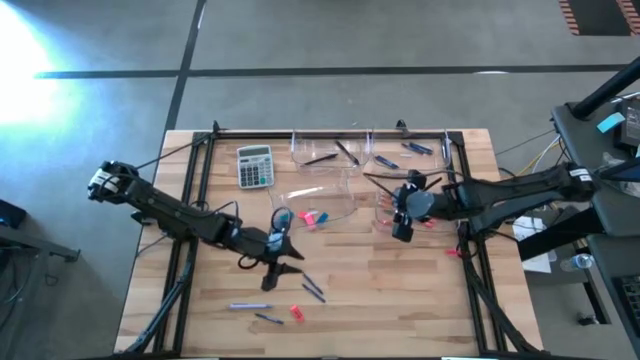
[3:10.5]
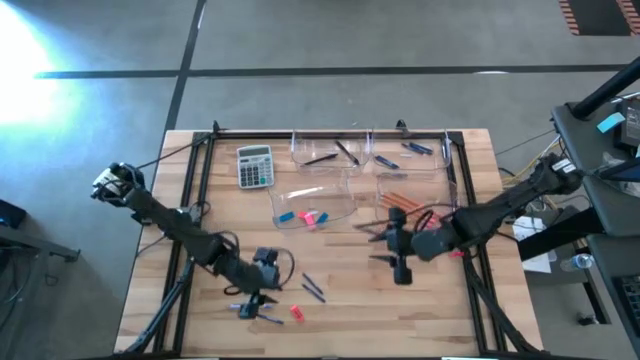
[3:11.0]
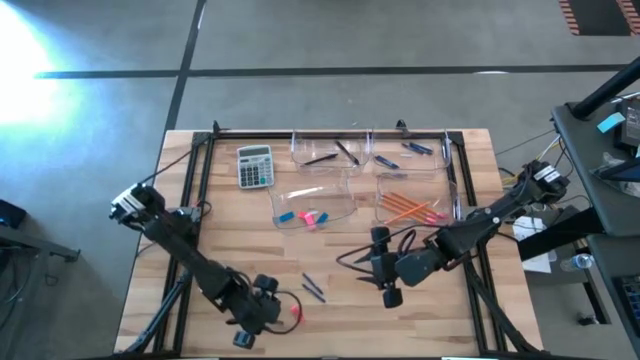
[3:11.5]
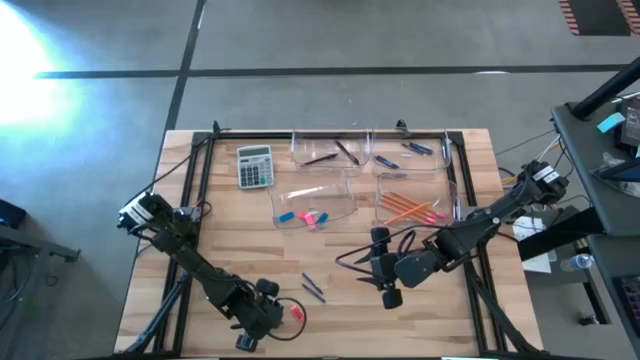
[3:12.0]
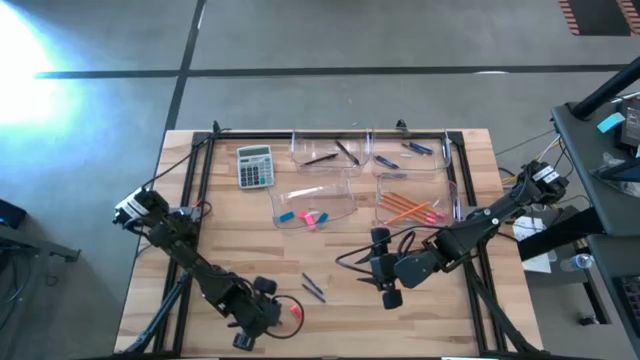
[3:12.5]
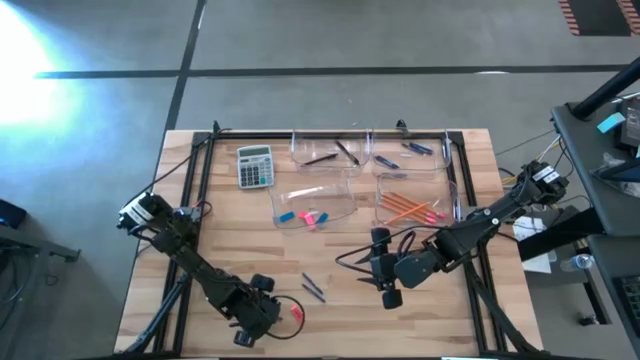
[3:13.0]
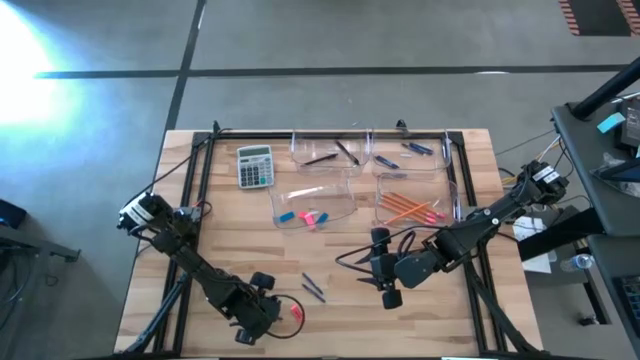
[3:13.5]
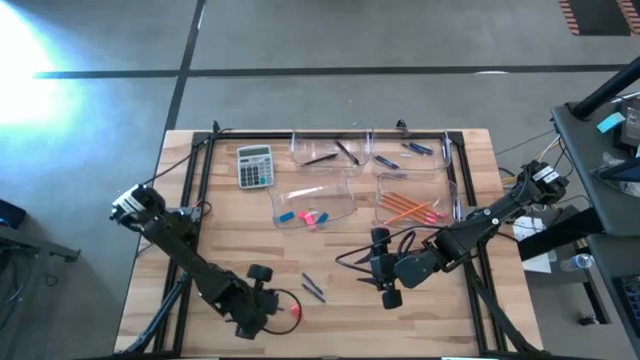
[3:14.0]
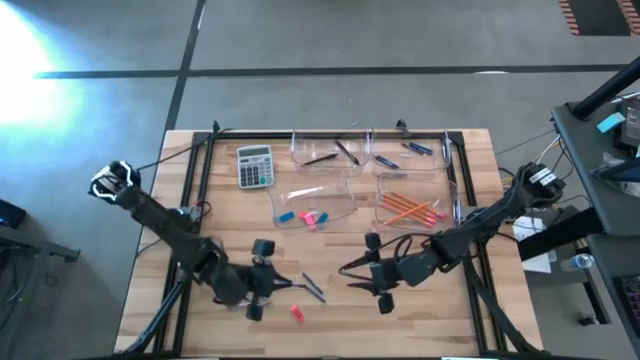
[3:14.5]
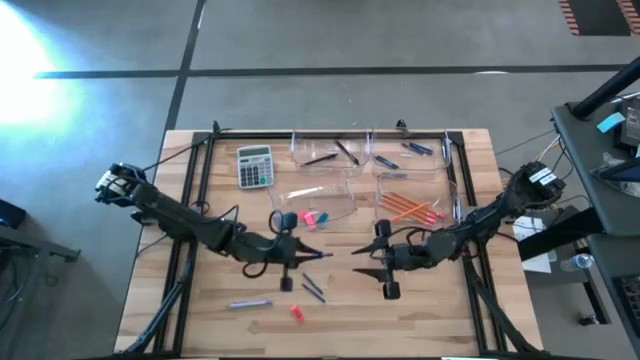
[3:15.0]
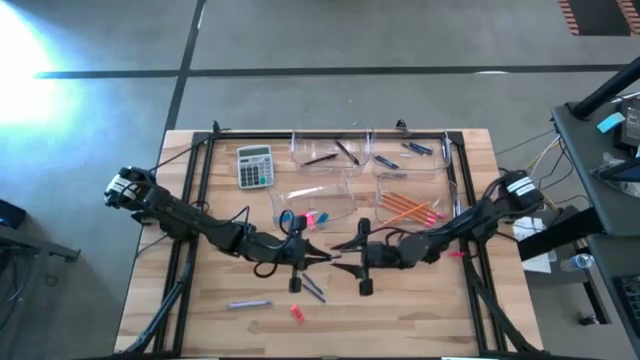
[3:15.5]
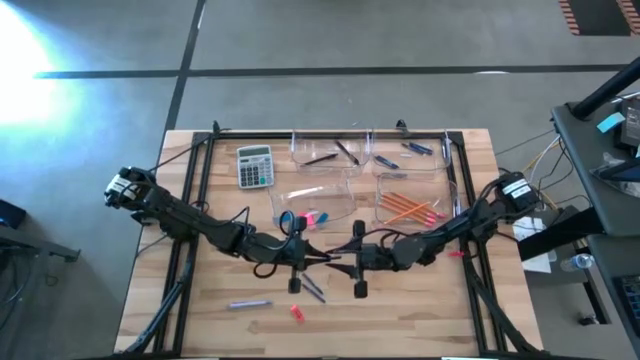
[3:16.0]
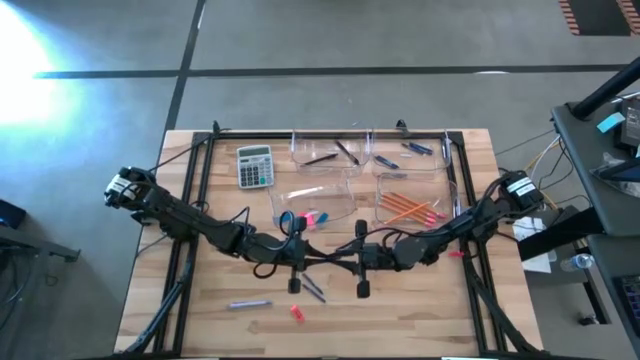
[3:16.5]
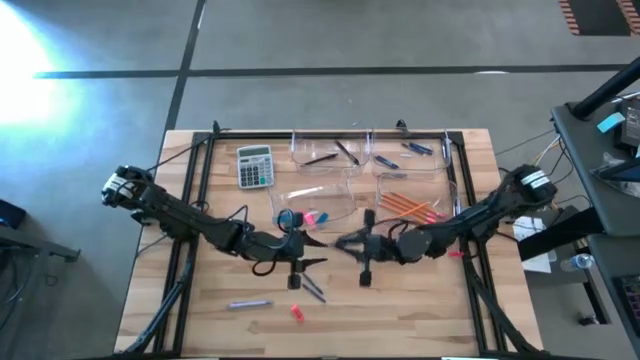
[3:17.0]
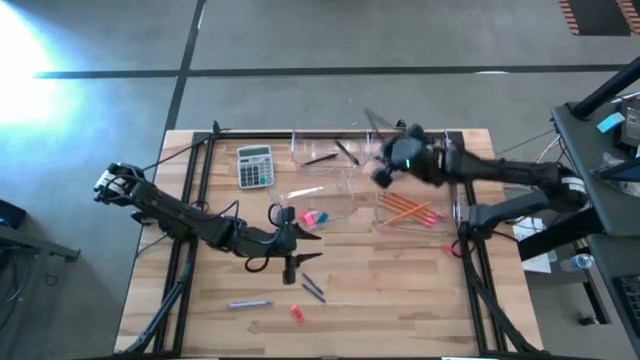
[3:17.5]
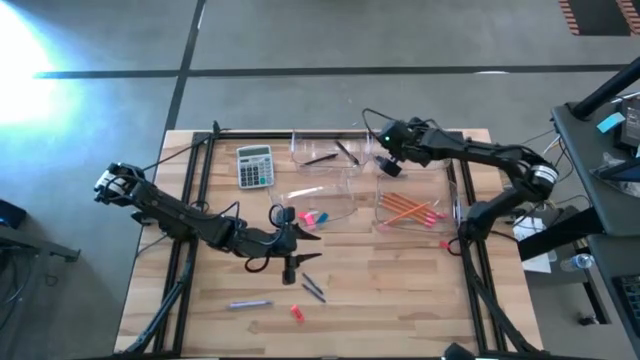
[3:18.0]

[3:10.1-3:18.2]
Task: Sort crayons/erasers/pens/pencils in bins
Put the blue crayon into the top right transparent bin

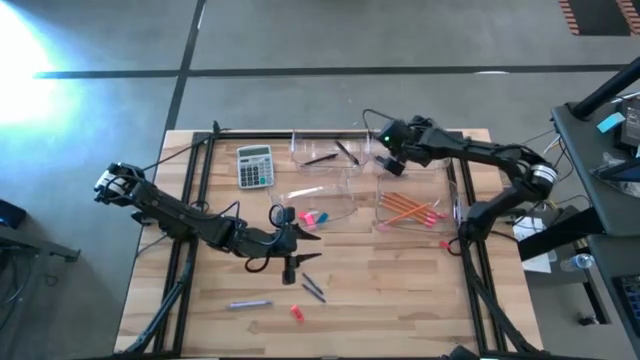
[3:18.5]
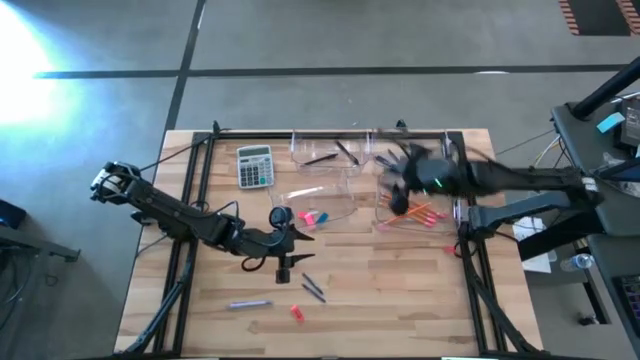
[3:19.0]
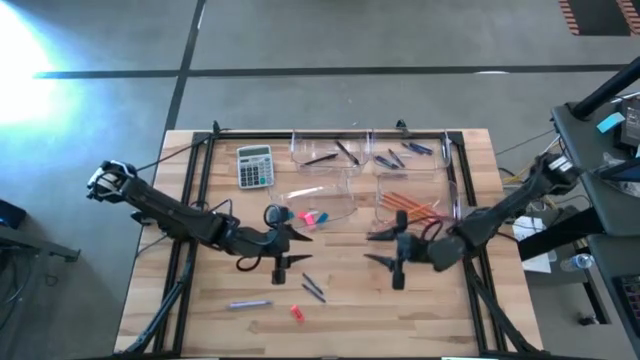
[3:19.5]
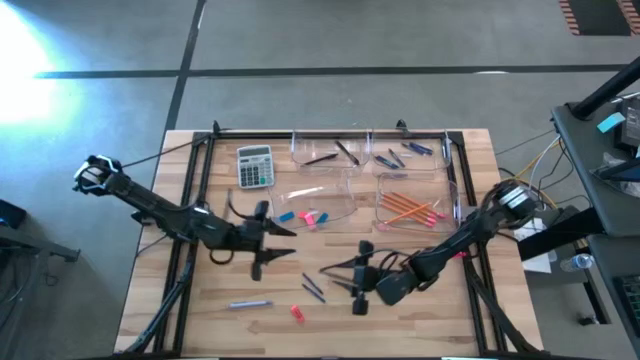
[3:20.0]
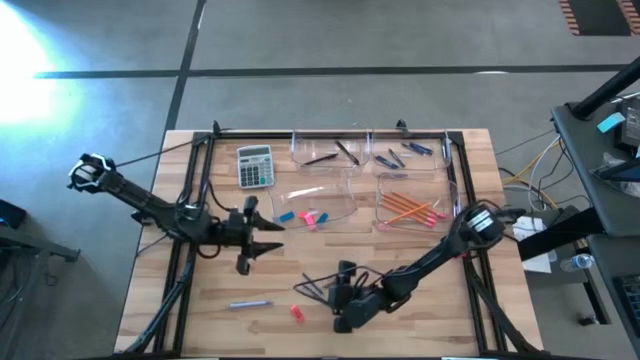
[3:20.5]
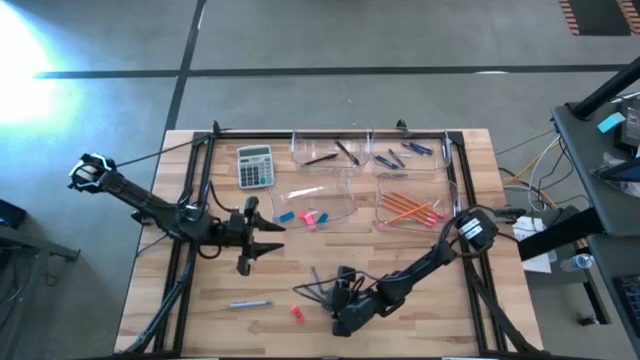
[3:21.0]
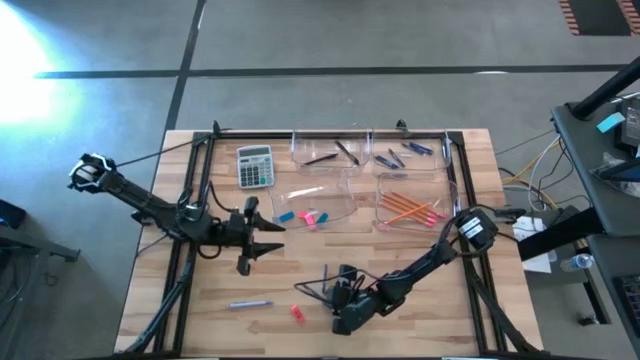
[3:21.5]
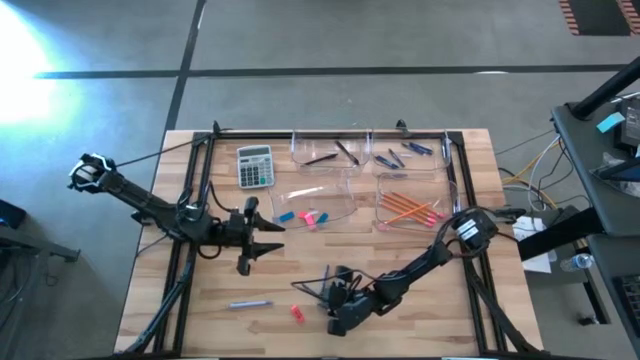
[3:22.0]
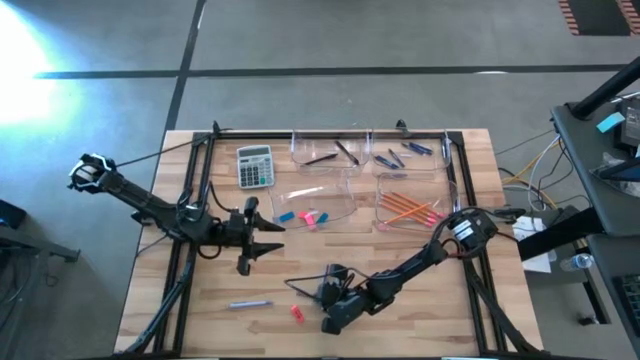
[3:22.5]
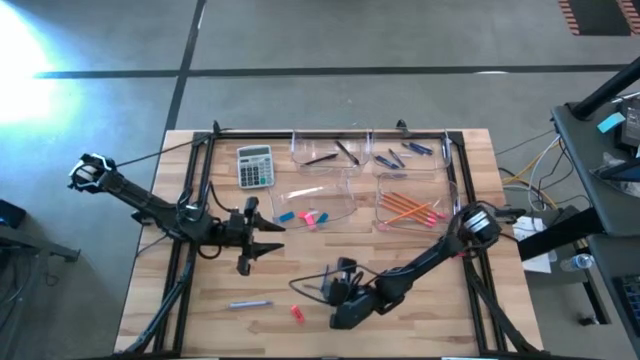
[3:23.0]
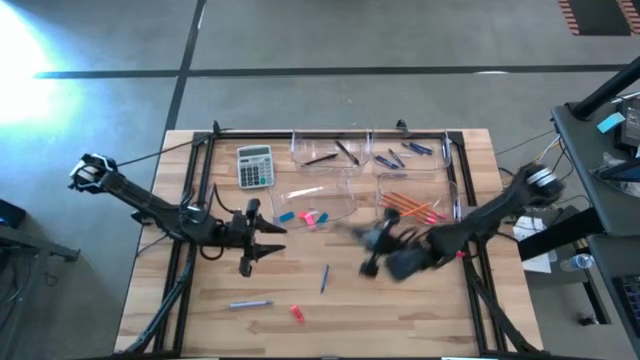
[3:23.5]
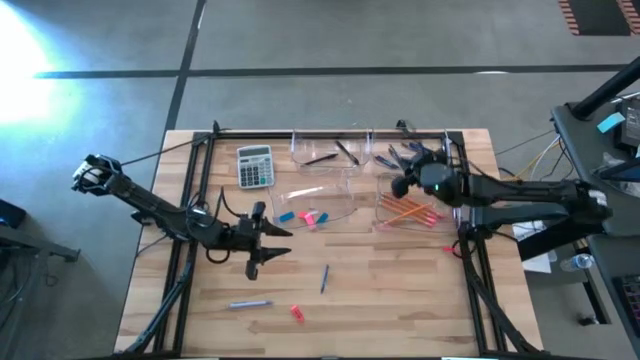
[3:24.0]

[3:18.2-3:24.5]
Put the blue crayon into the top right transparent bin

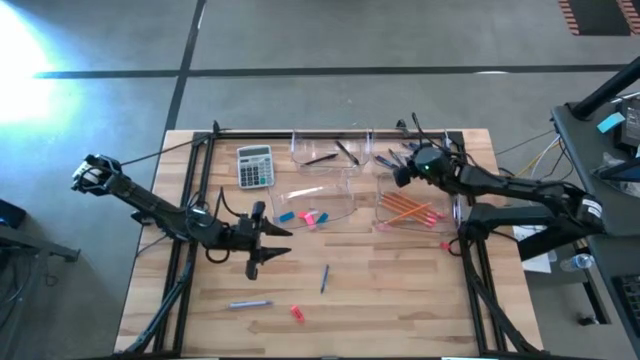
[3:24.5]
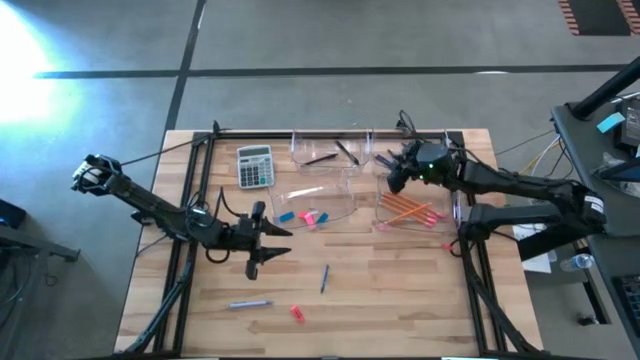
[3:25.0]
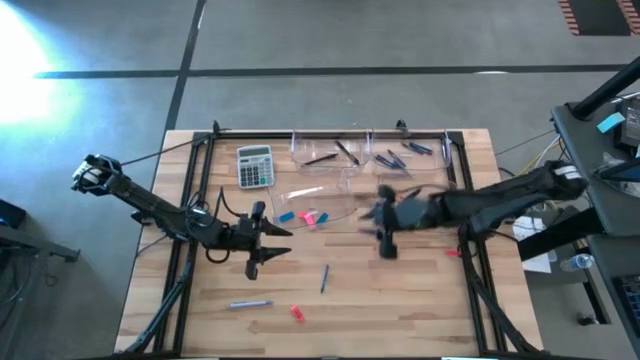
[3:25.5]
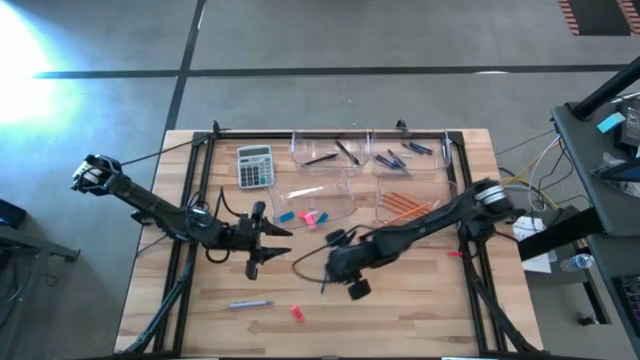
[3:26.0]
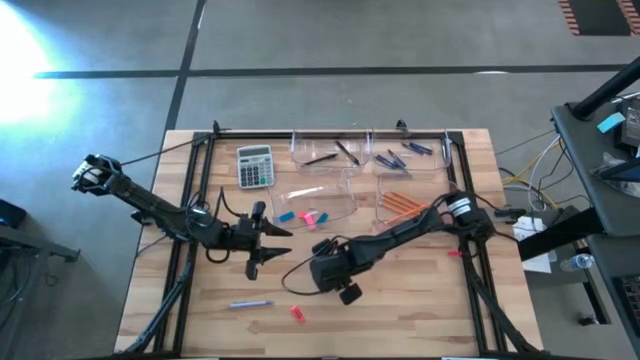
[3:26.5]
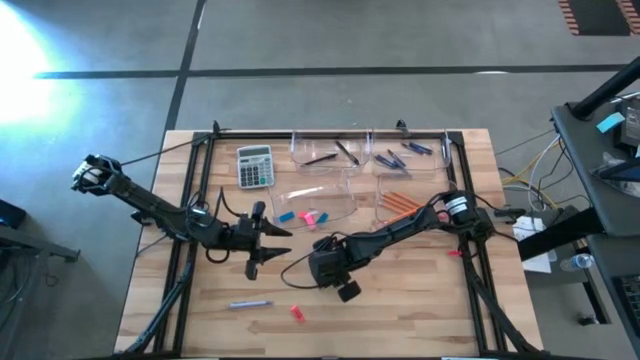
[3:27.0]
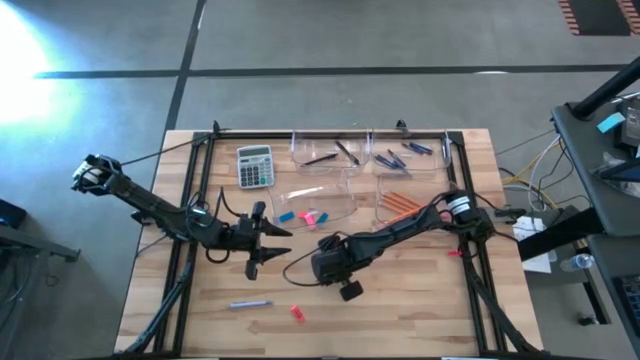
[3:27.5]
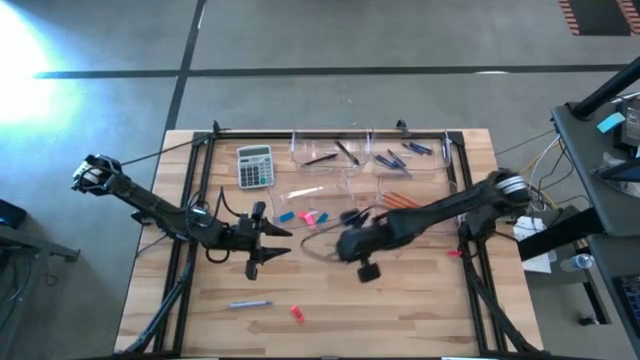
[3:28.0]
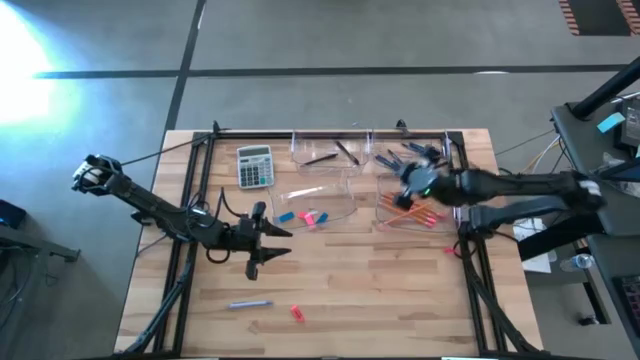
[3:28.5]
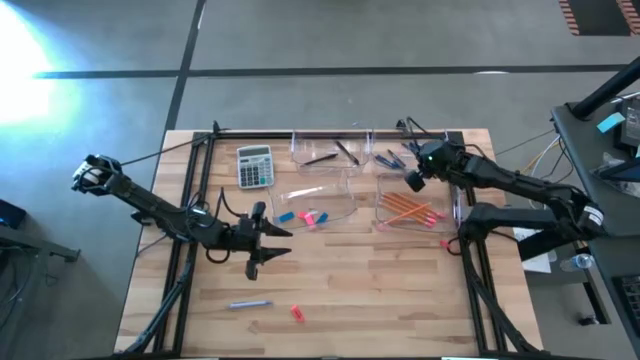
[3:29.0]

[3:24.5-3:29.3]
Put the blue crayon into the top right transparent bin

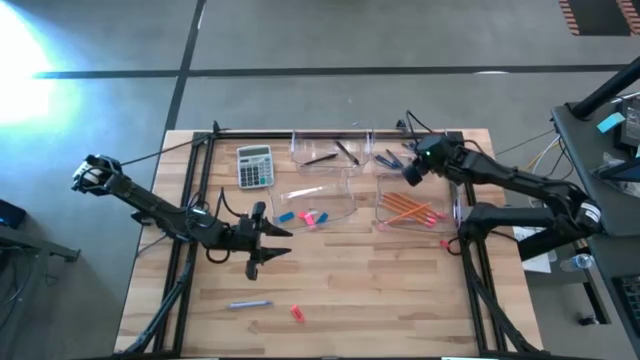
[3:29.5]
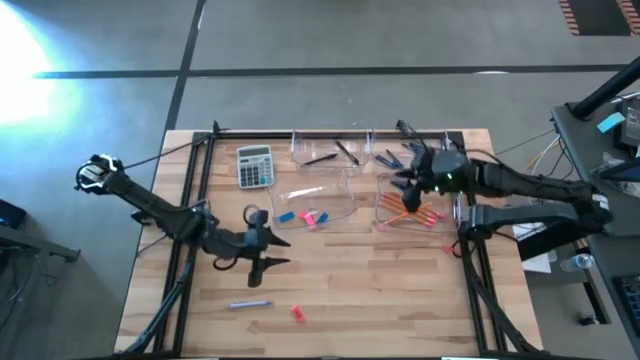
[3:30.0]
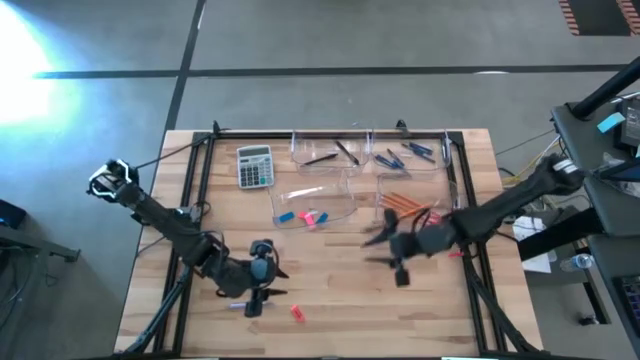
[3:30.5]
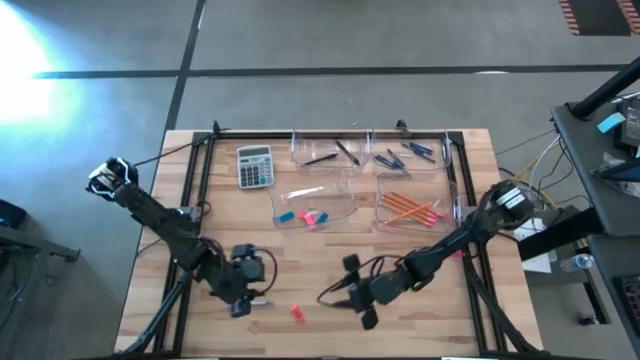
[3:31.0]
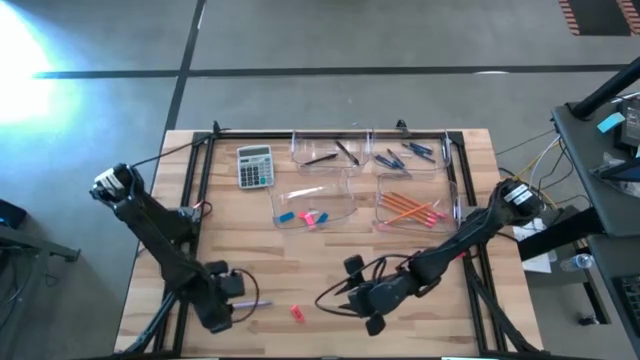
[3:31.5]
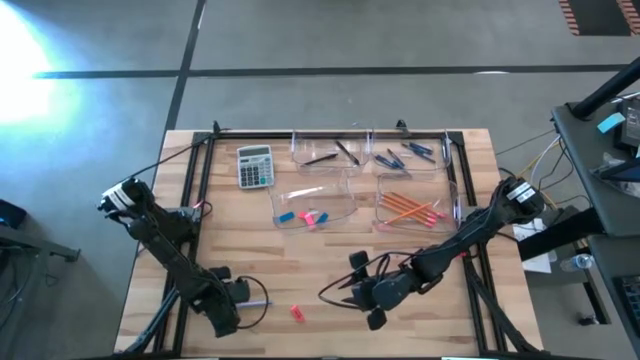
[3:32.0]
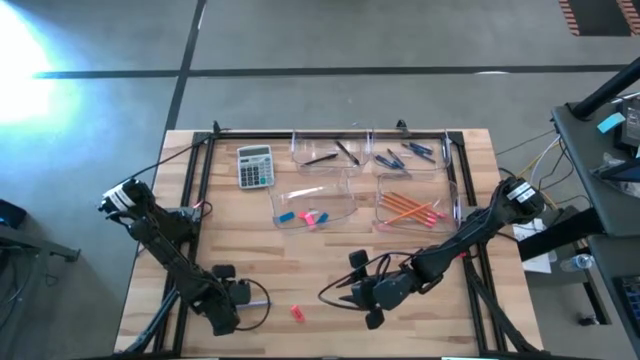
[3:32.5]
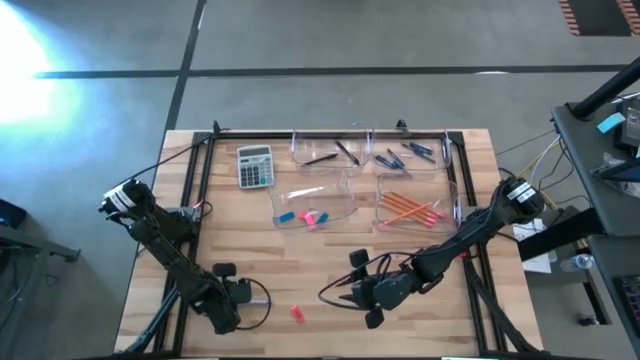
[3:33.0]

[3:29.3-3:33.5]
Put the white pen into the top left transparent bin
